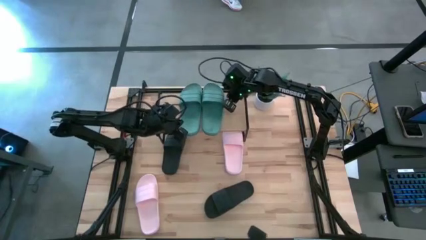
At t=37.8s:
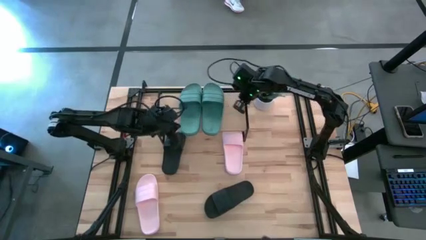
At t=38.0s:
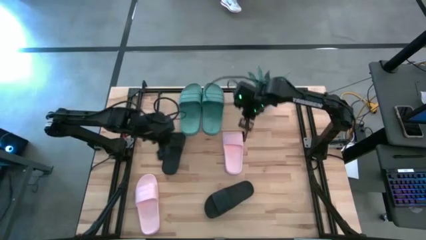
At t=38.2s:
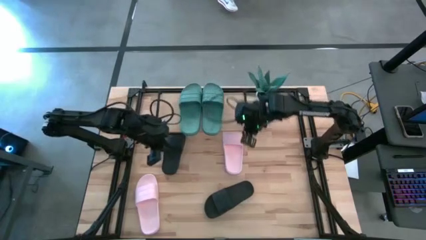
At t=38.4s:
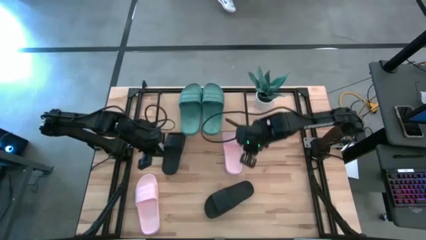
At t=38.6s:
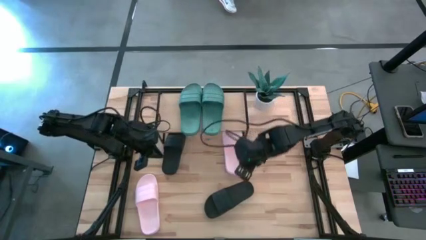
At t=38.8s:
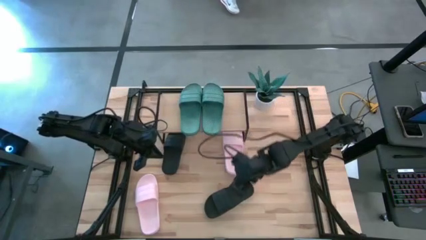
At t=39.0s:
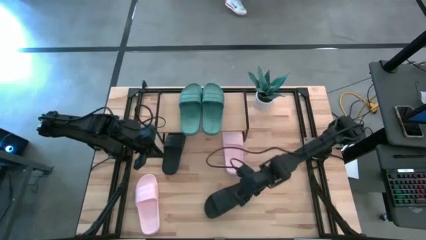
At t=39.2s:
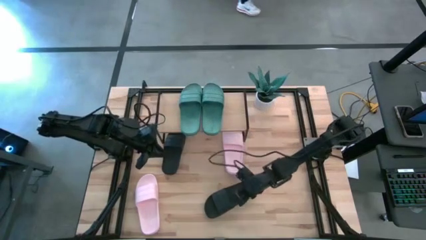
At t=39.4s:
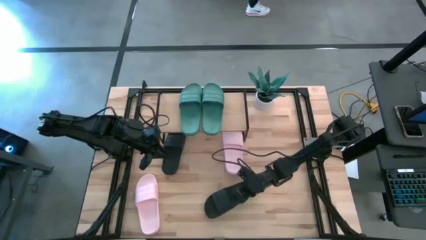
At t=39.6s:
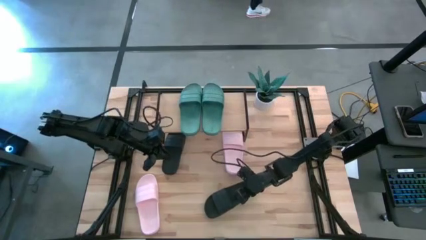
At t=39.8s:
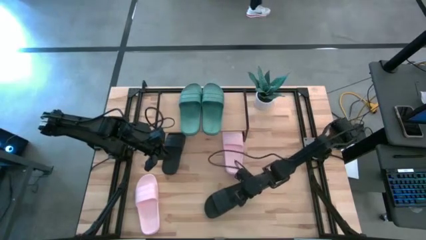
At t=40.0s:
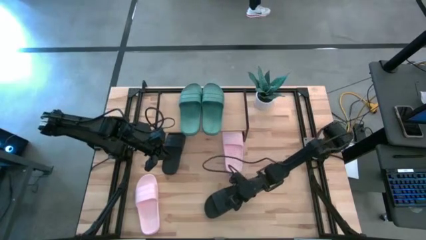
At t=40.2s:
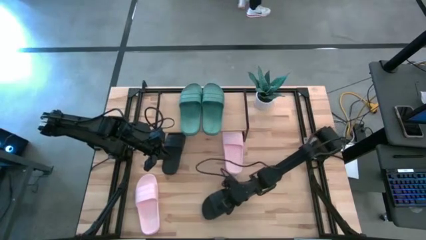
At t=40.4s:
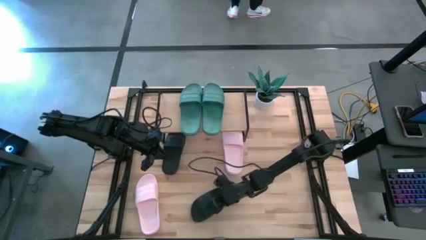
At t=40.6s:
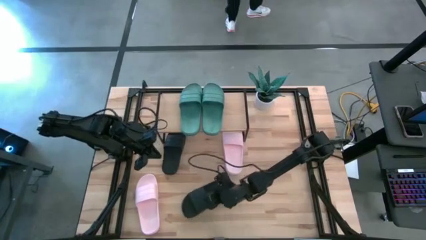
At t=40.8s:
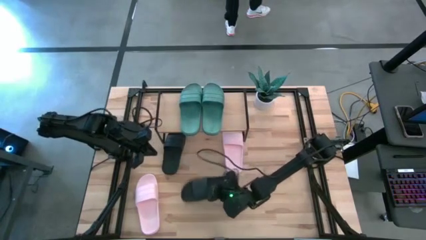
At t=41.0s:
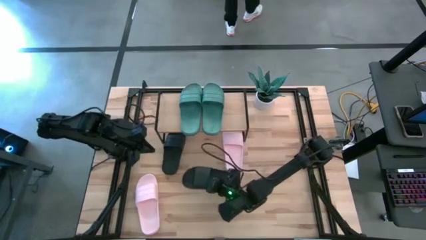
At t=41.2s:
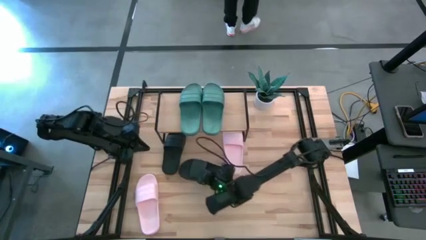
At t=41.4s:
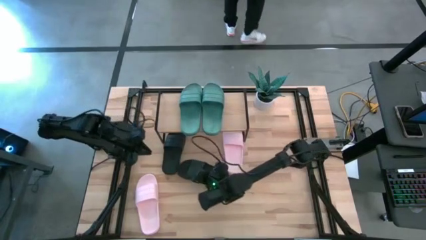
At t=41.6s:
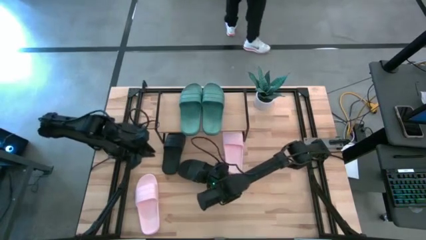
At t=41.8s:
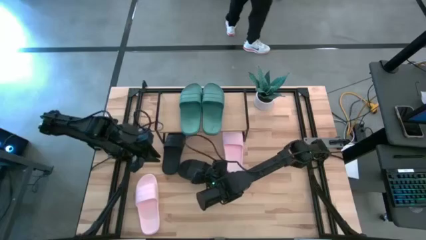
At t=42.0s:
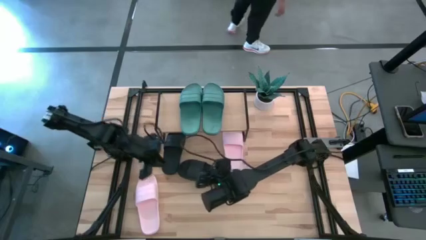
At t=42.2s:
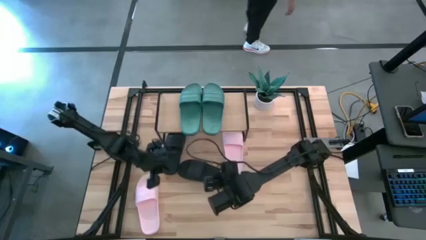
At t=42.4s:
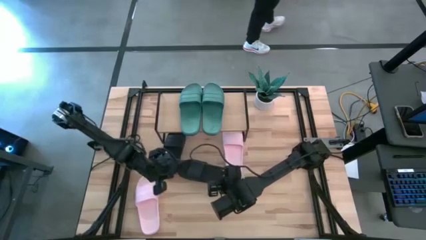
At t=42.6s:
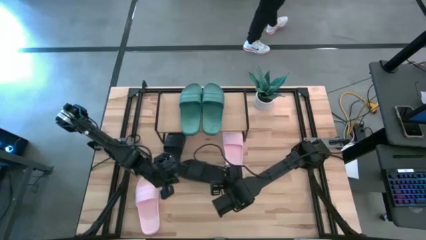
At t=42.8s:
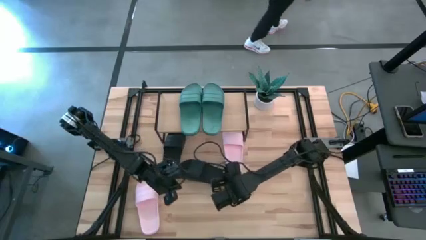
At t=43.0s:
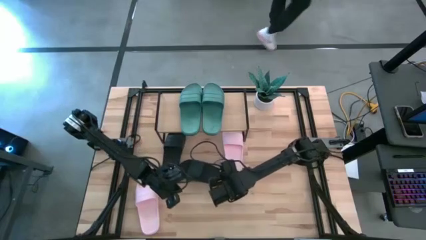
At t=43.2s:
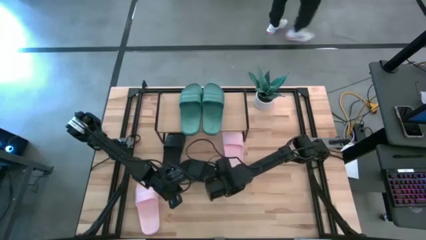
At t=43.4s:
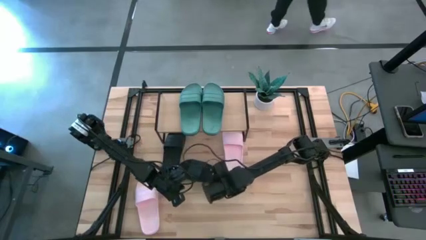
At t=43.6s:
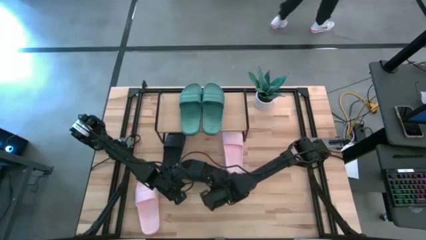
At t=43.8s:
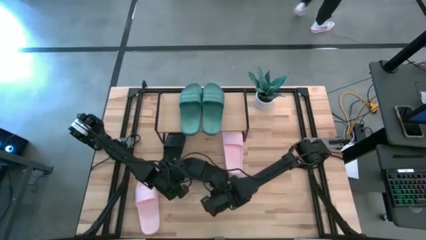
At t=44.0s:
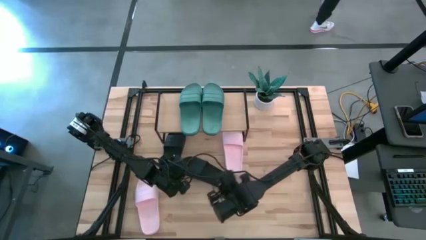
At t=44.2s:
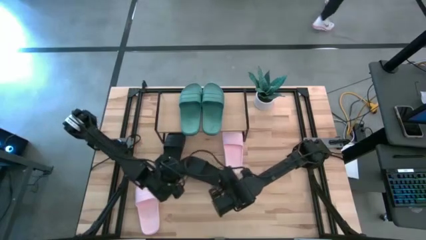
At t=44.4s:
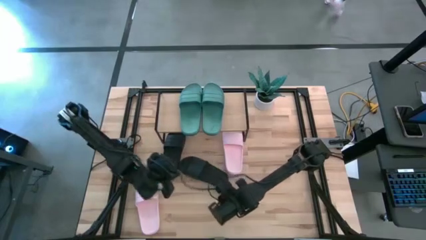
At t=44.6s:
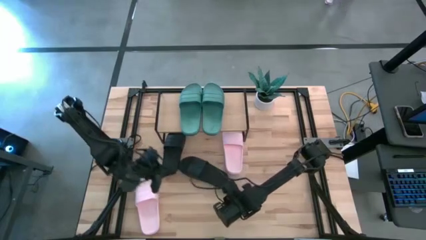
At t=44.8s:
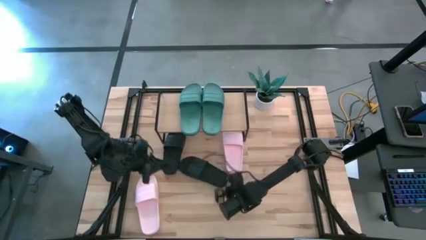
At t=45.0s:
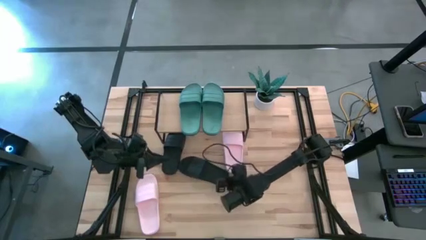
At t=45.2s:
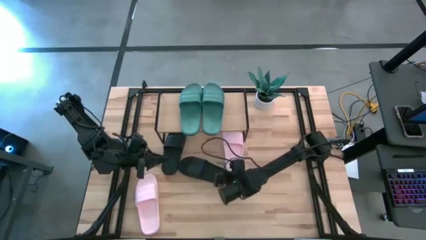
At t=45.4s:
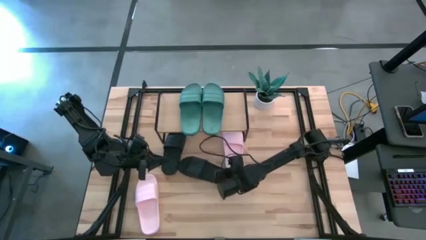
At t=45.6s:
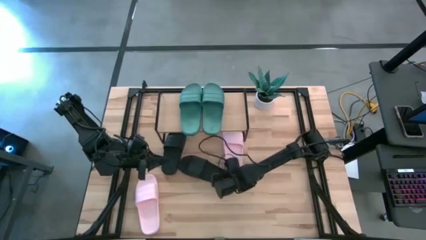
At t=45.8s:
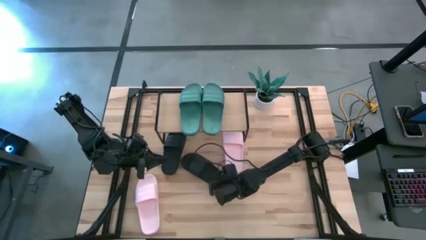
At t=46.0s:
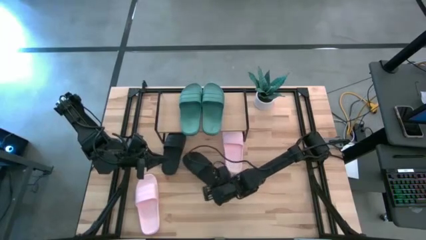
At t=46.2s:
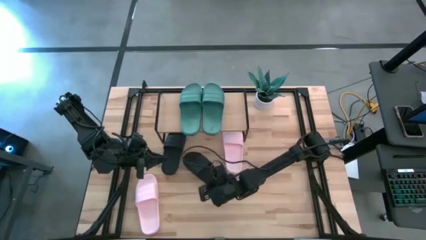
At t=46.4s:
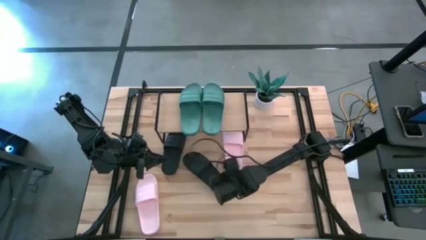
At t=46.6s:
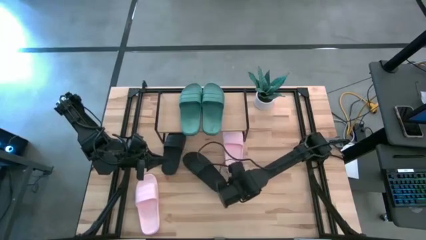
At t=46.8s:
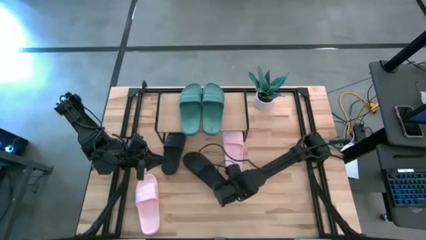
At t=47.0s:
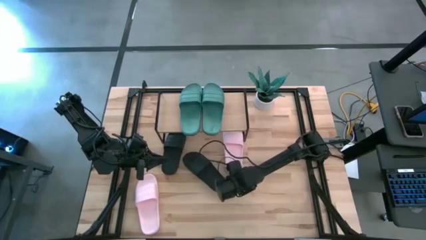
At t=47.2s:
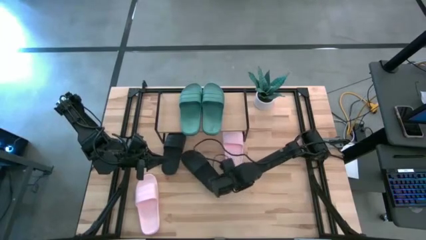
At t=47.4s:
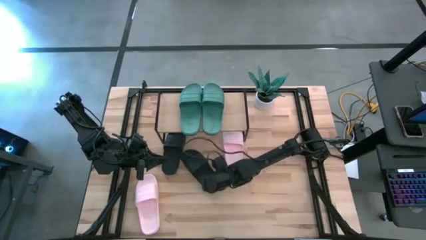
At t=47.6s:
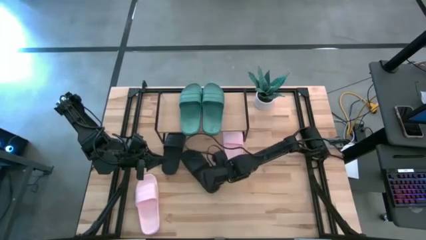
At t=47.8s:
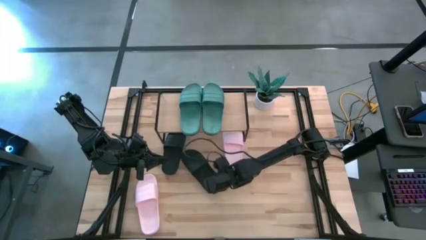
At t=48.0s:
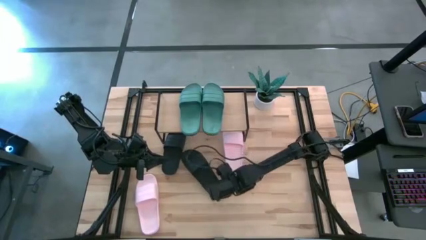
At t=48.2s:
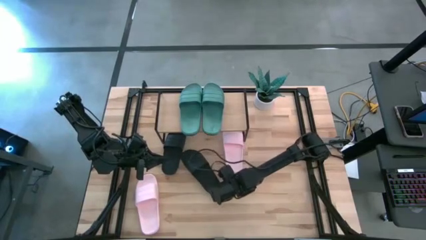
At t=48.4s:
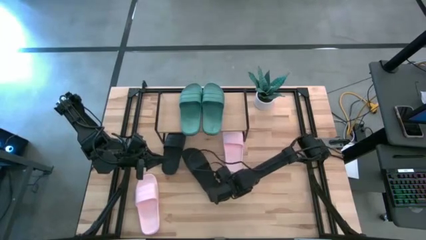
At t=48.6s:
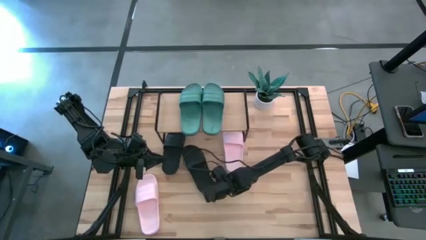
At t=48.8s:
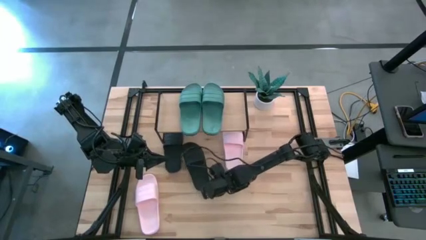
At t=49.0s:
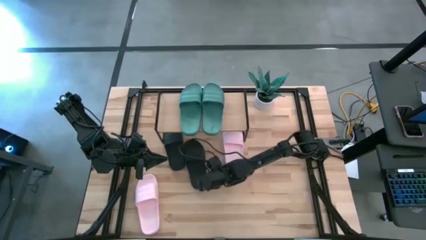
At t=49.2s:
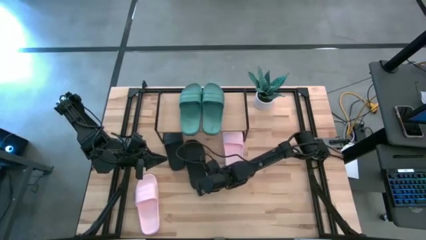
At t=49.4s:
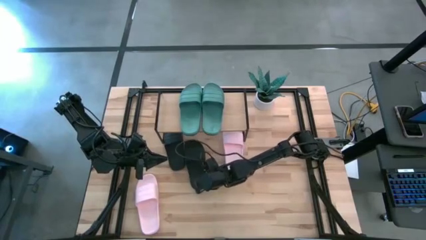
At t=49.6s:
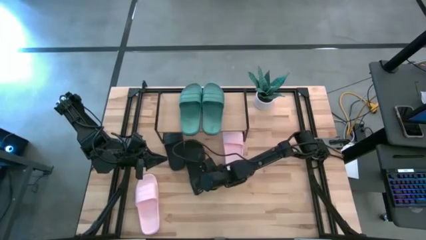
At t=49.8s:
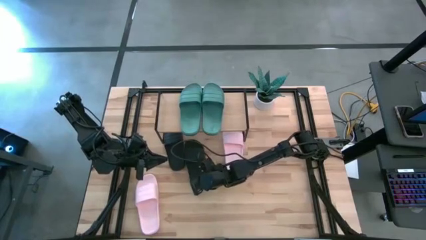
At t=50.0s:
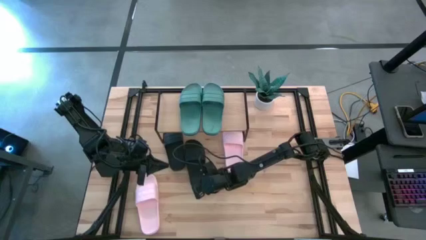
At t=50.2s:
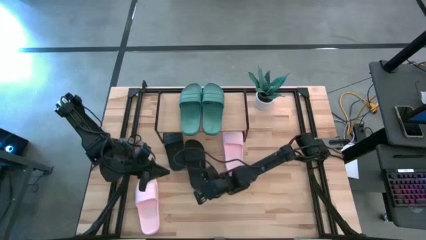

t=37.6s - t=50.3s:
Task: Pick and place slides into the shelf
Move the black slide under the shelf
